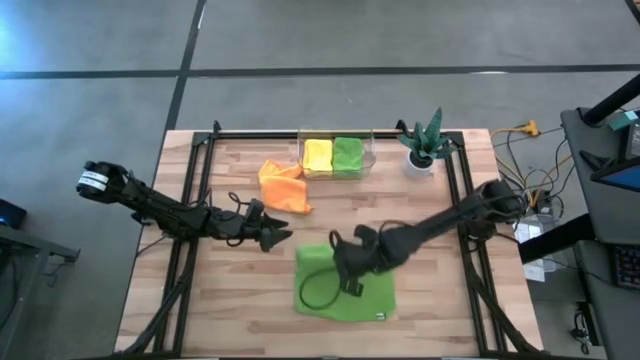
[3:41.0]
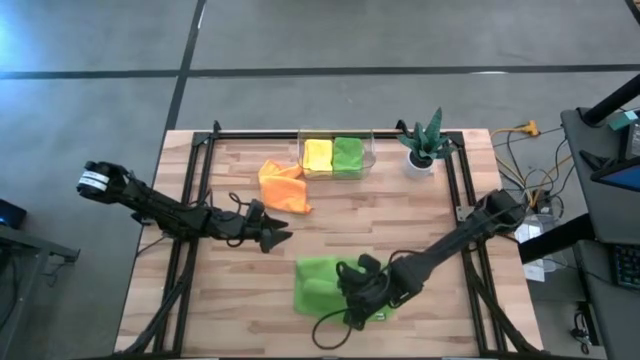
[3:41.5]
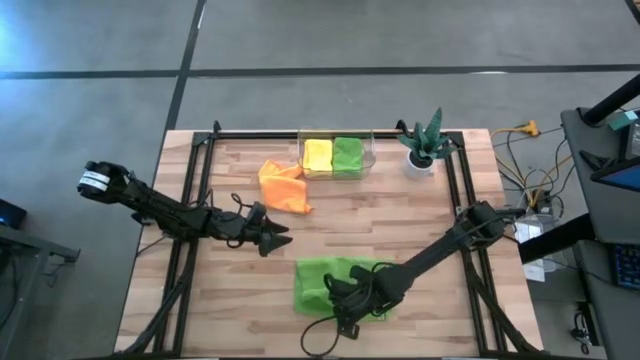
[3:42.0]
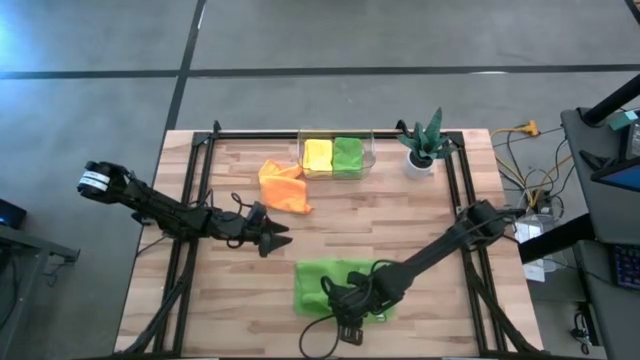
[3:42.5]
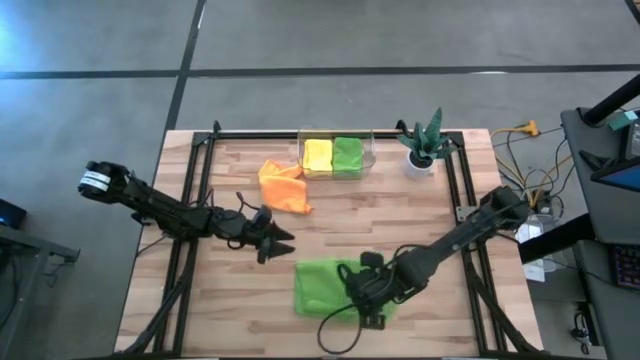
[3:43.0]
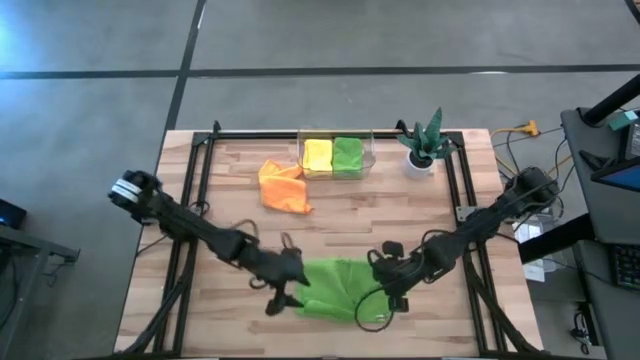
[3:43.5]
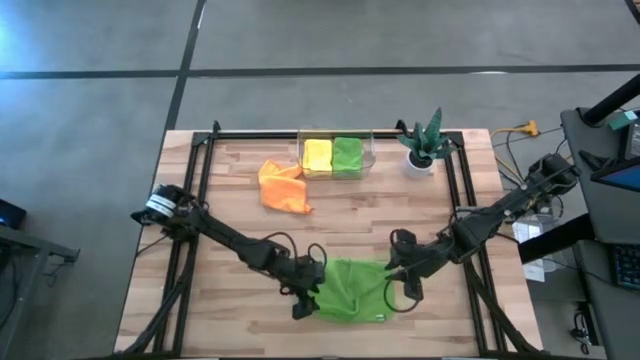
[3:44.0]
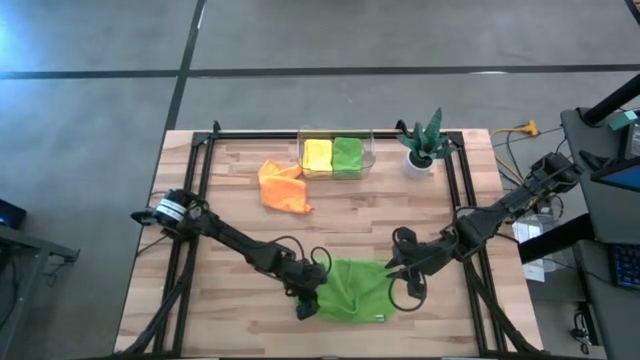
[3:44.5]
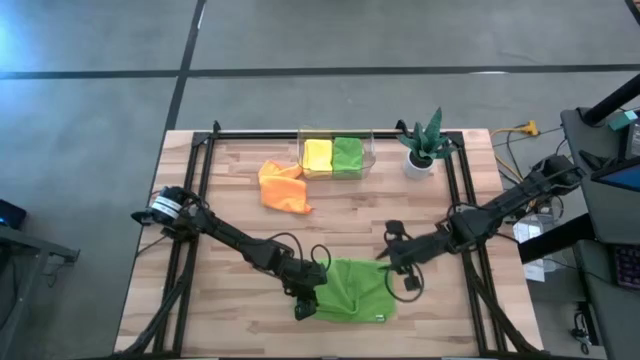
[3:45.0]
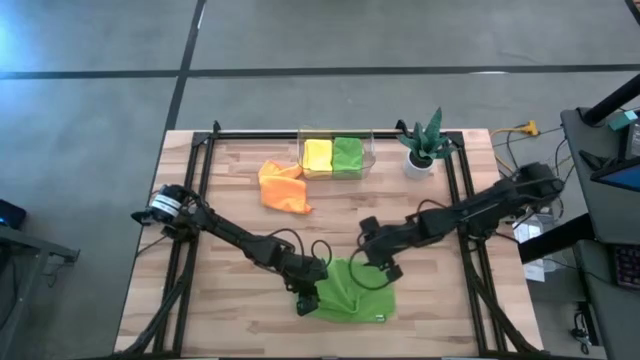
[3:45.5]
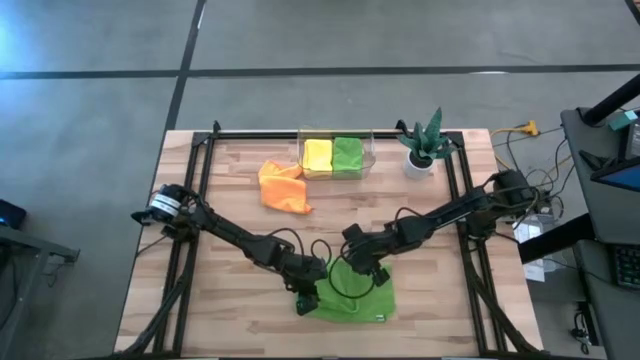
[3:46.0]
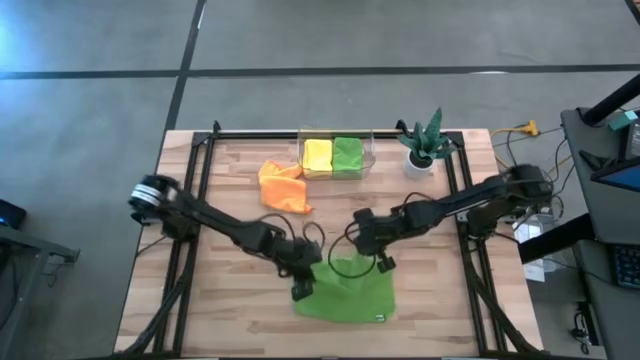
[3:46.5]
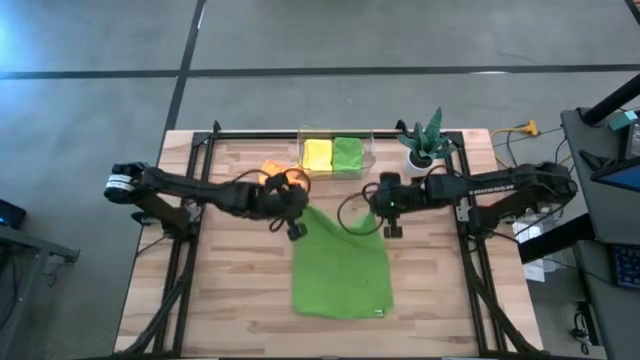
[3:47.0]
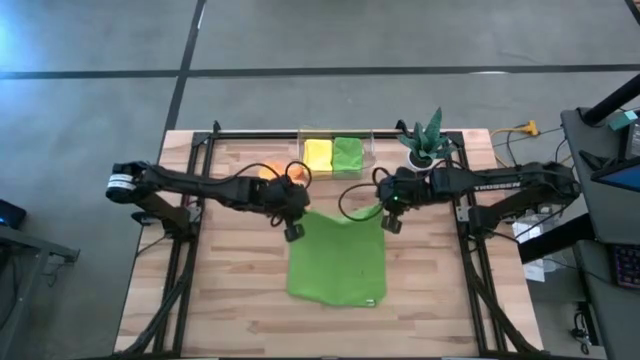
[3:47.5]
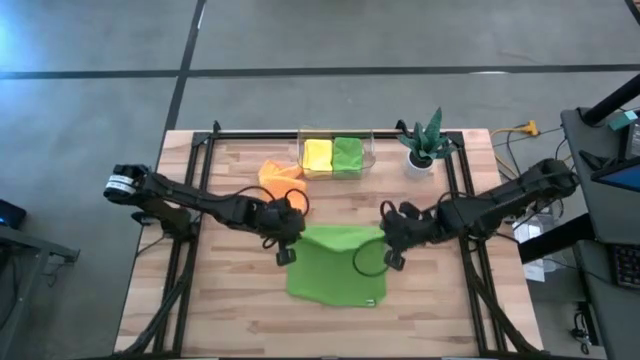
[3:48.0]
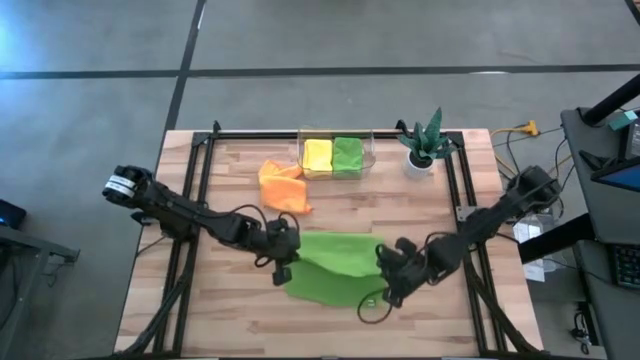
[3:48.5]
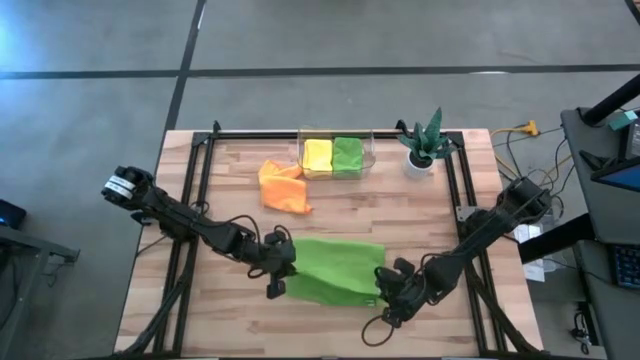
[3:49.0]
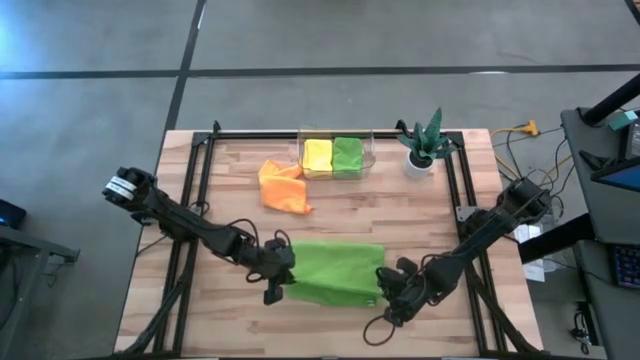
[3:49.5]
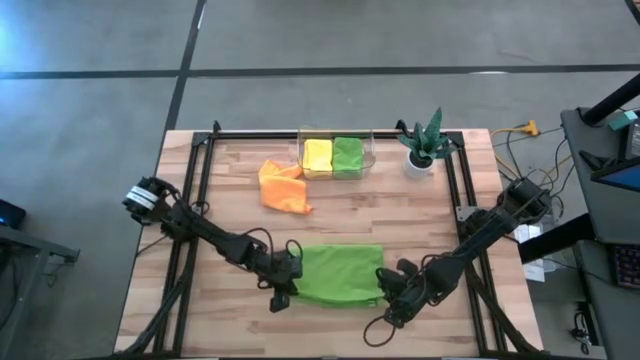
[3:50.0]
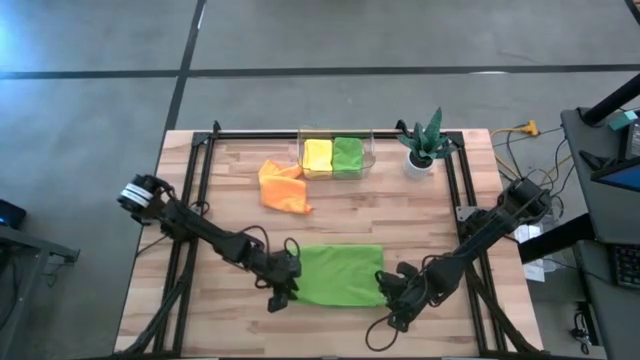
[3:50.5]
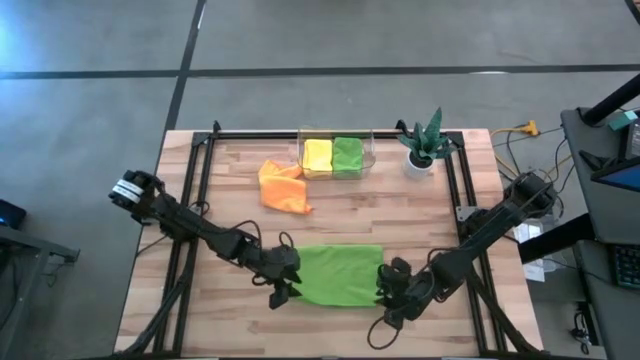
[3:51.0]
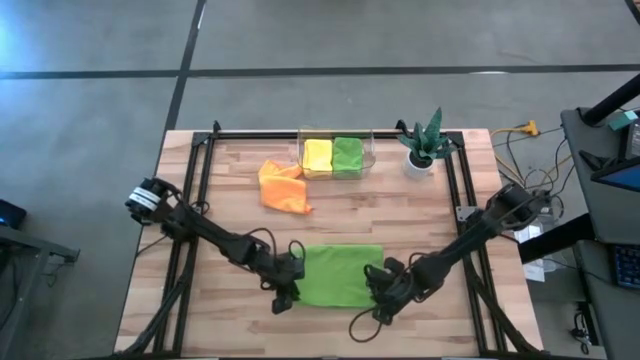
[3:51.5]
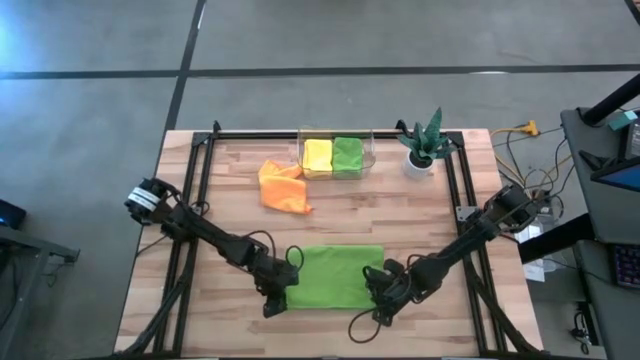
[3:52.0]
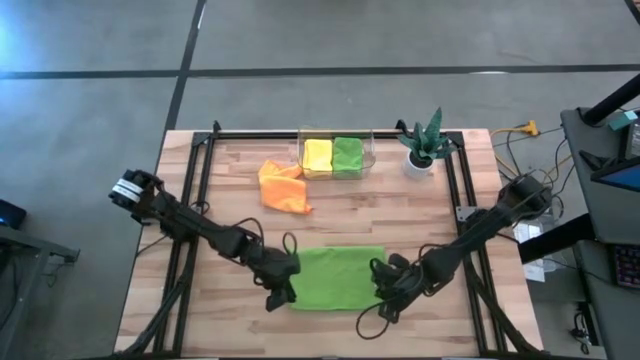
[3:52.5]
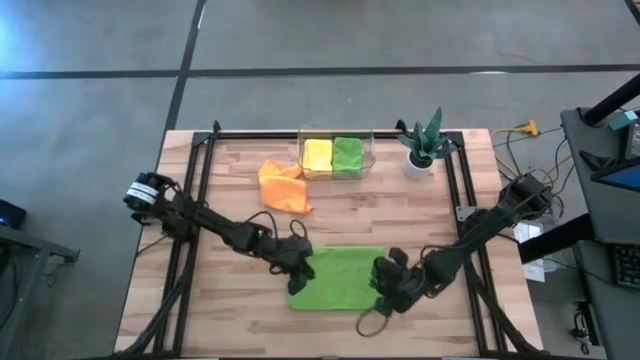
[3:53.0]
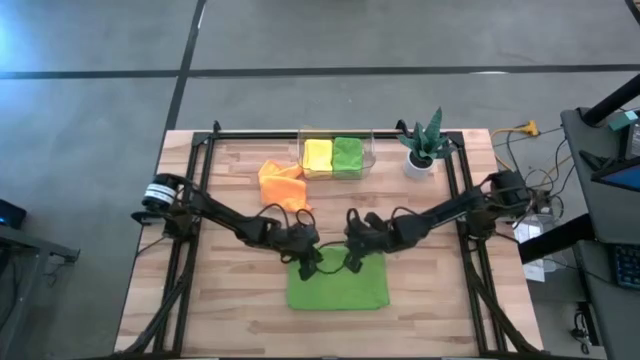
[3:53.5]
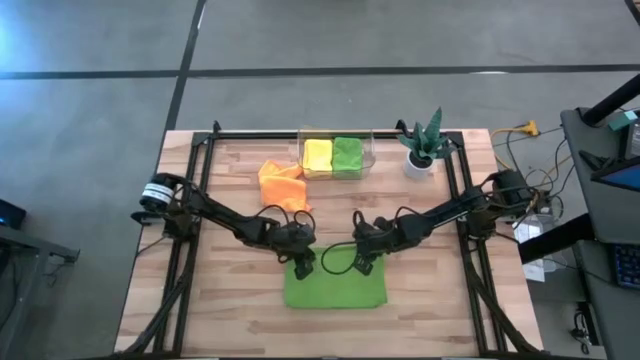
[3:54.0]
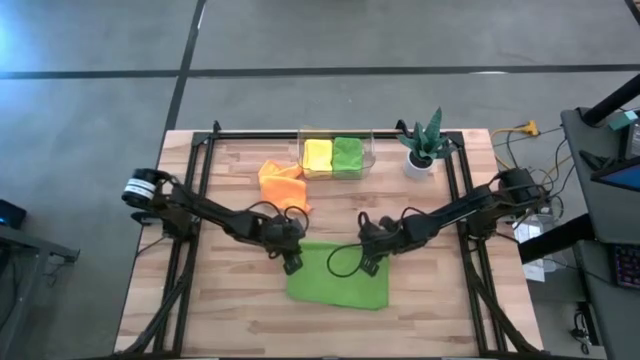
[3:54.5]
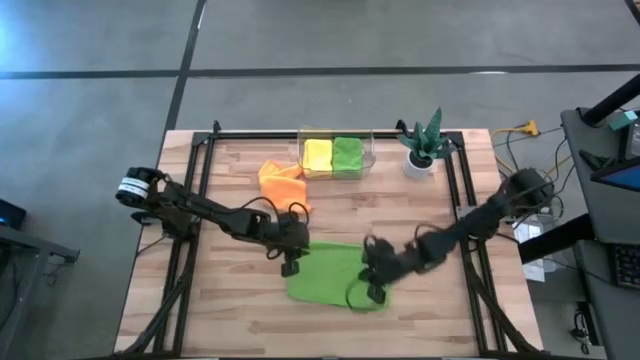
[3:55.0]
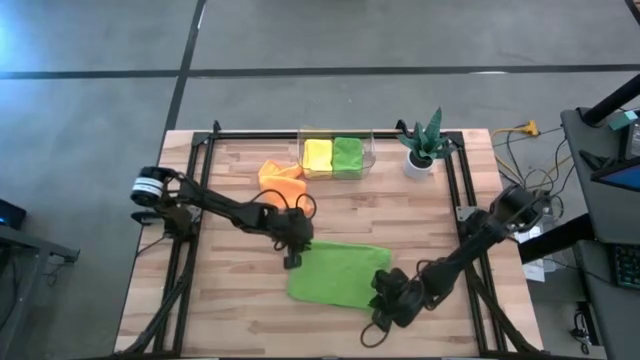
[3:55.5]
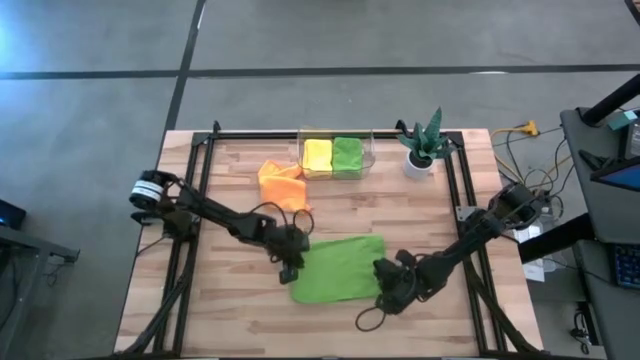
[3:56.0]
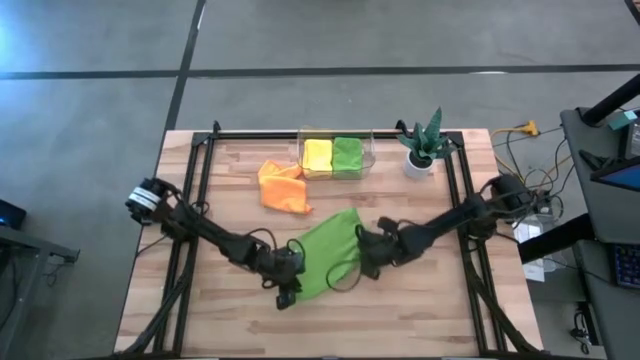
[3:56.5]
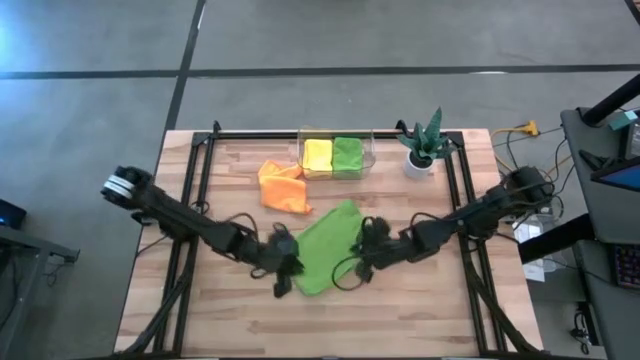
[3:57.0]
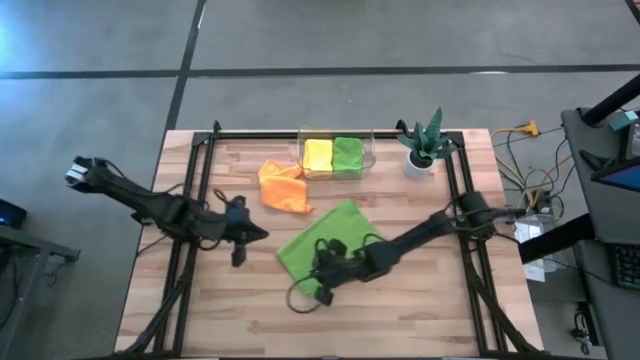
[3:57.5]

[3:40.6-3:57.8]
Task: Fold microfiber towels
Fold the green microfiber towel

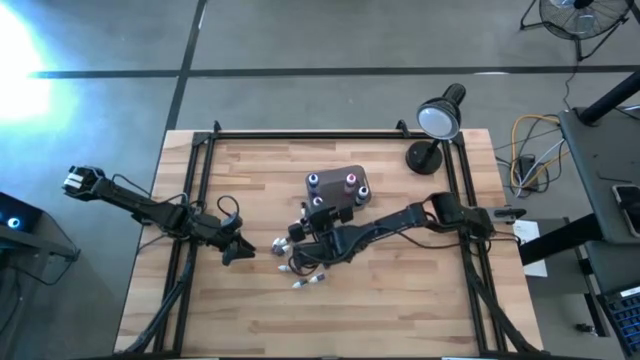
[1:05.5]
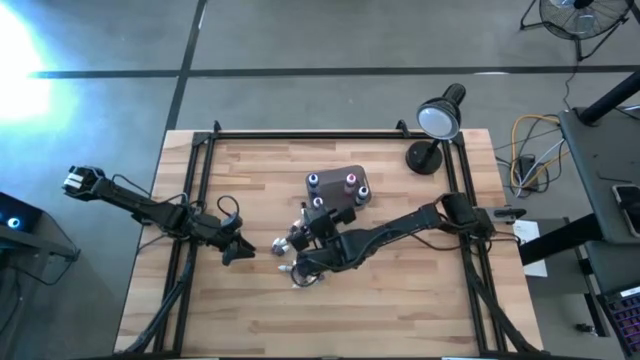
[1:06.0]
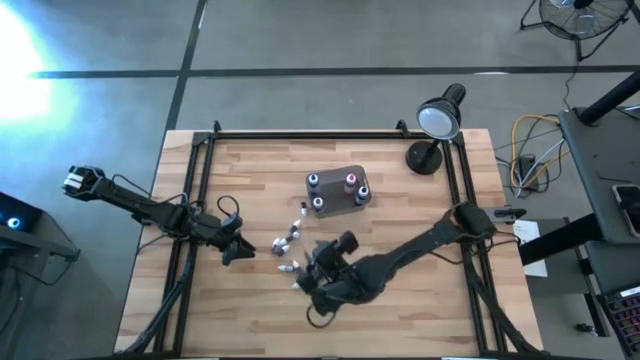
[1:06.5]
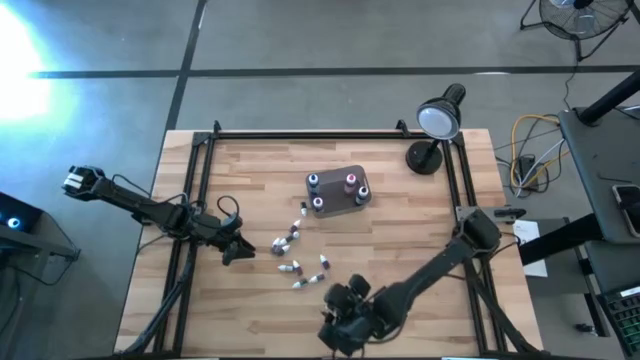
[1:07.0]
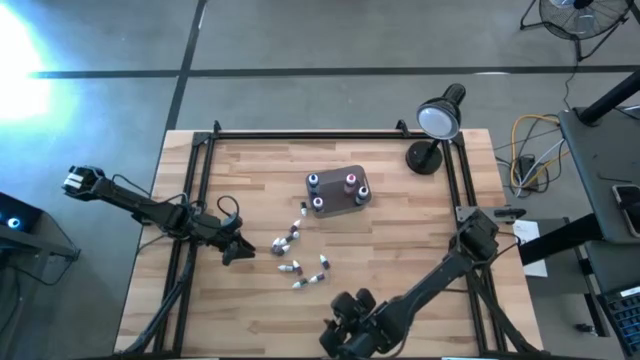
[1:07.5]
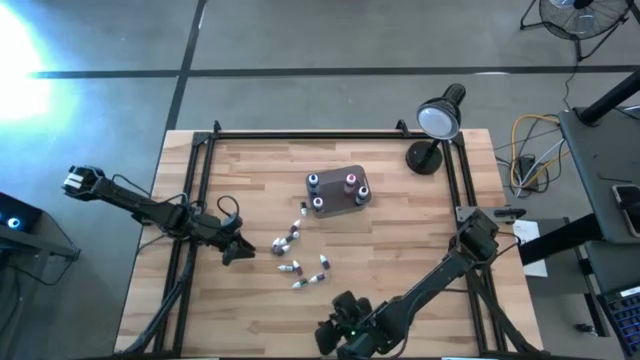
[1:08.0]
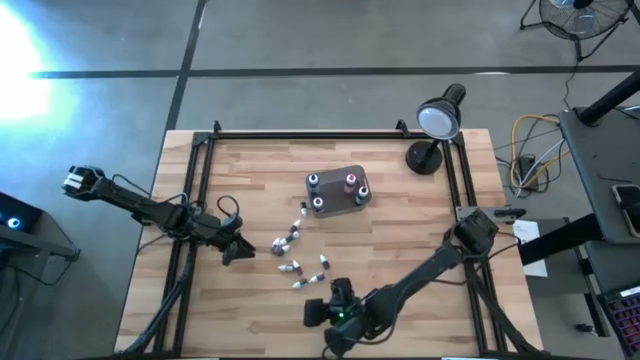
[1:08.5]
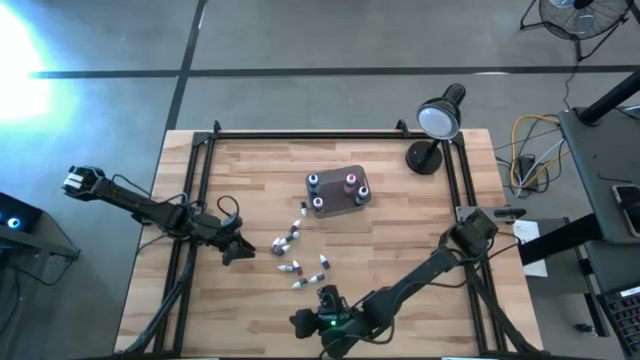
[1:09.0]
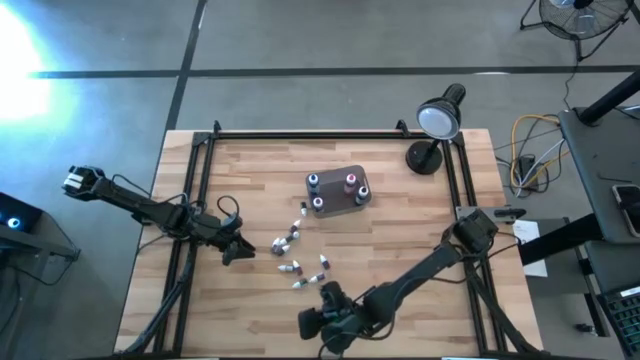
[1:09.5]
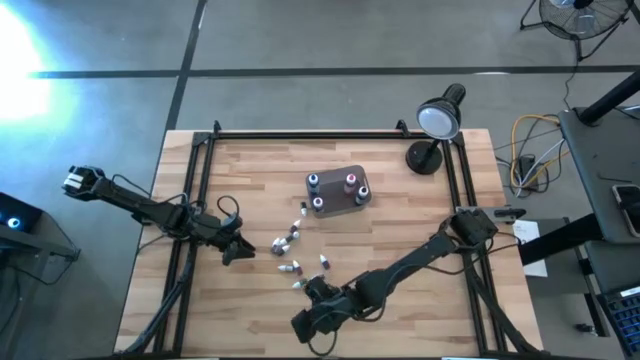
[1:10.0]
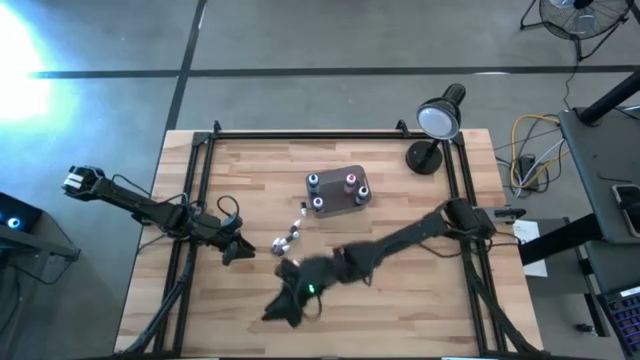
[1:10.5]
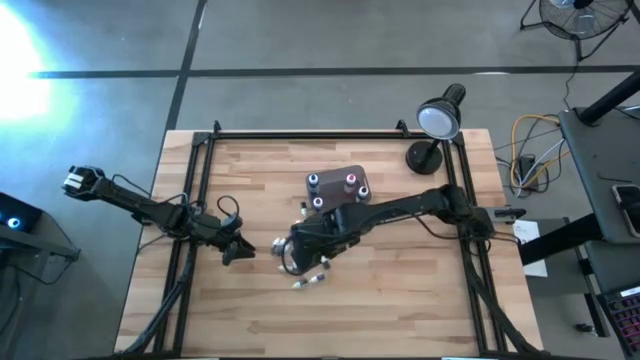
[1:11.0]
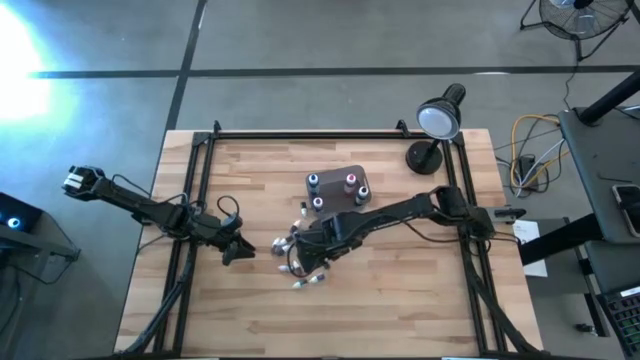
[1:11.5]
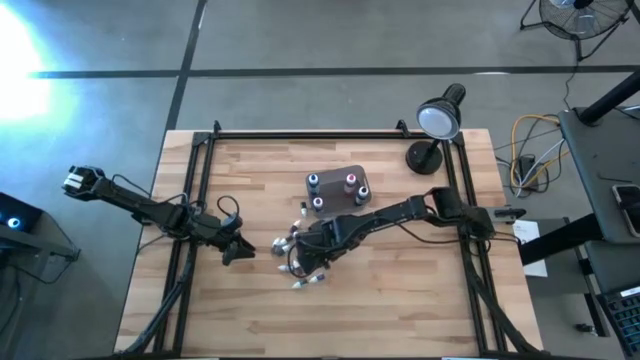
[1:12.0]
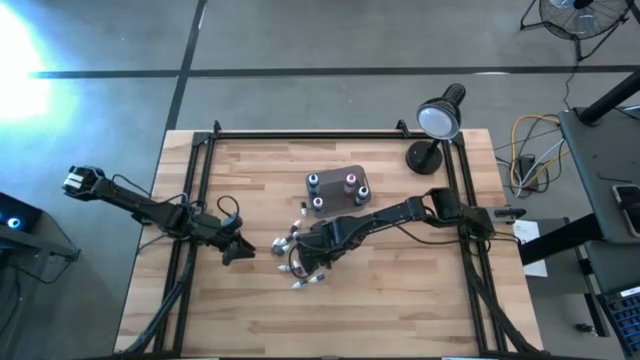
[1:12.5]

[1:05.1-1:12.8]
Task: Pick & Place food coloring
Put the small dark green food coloring bottle into the black transparent bin
